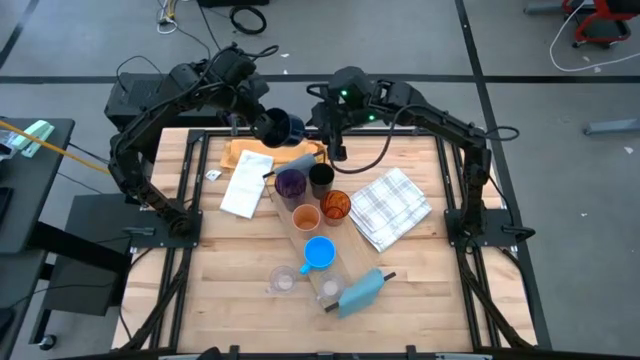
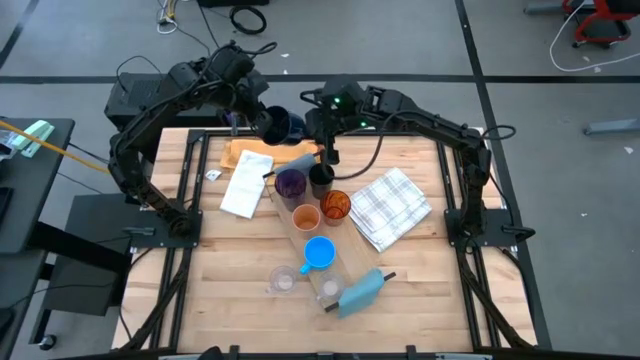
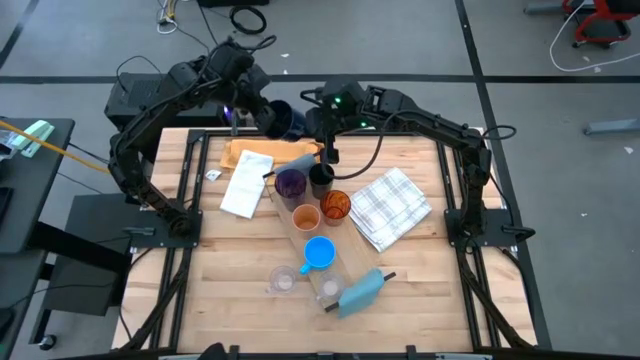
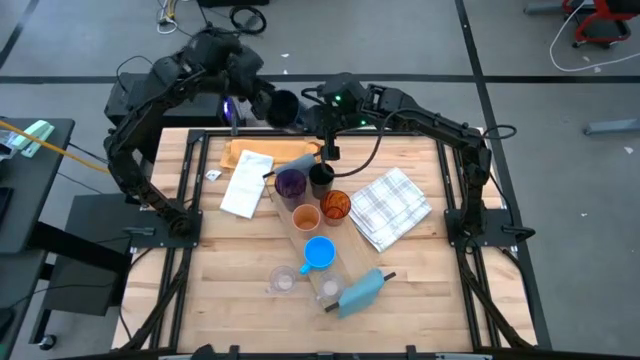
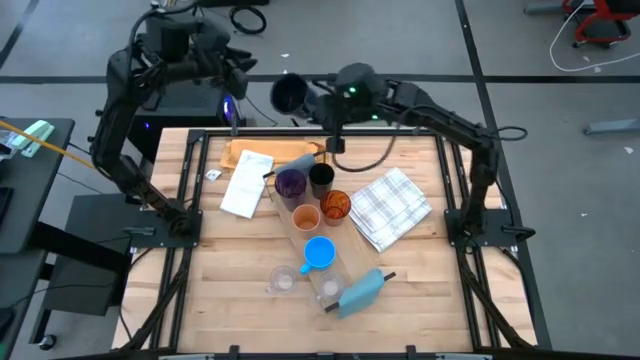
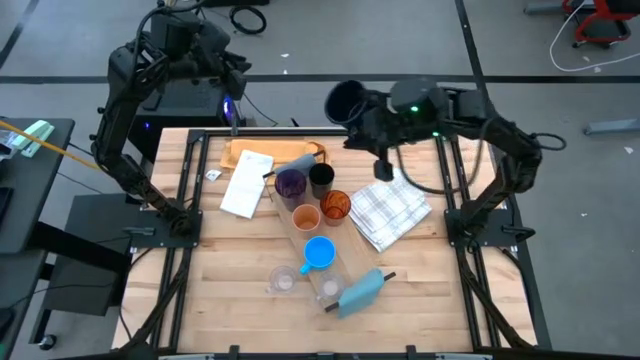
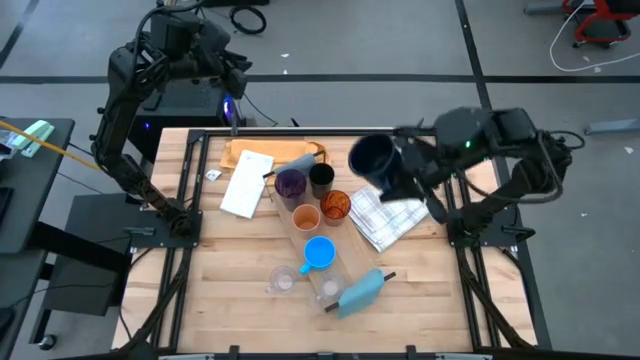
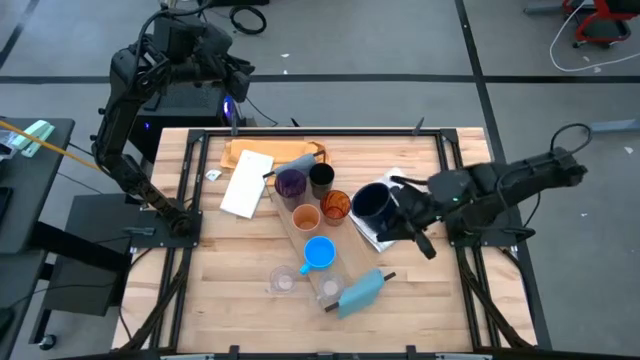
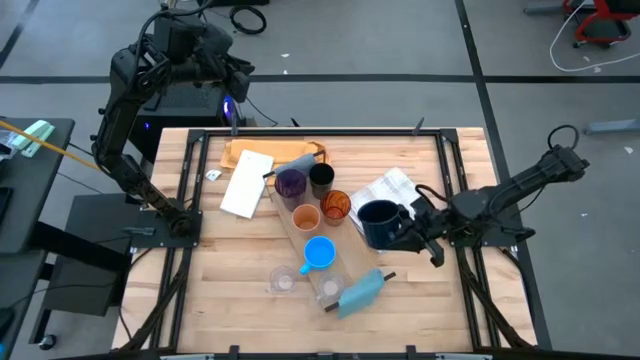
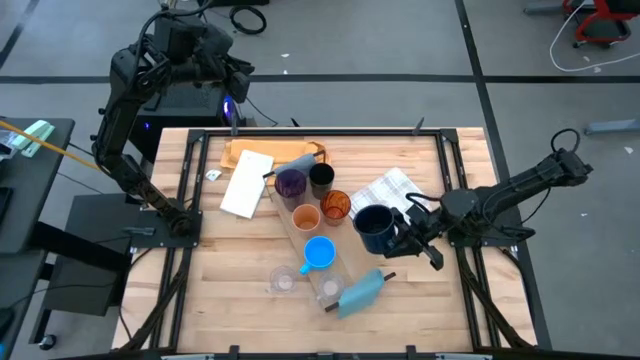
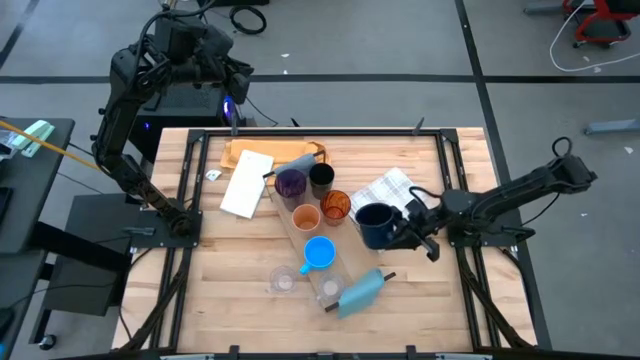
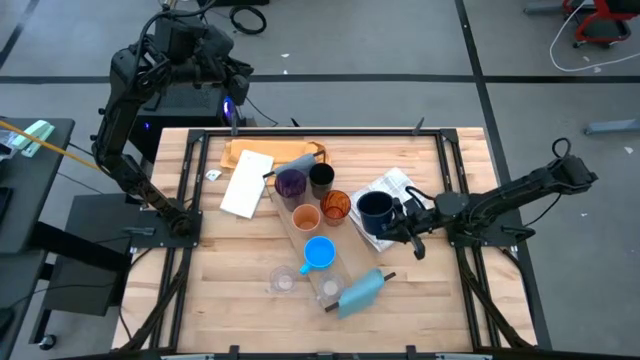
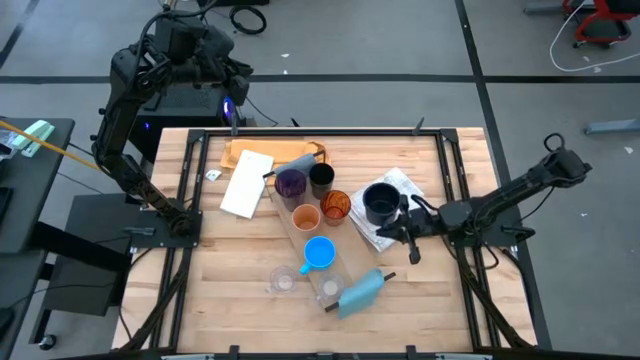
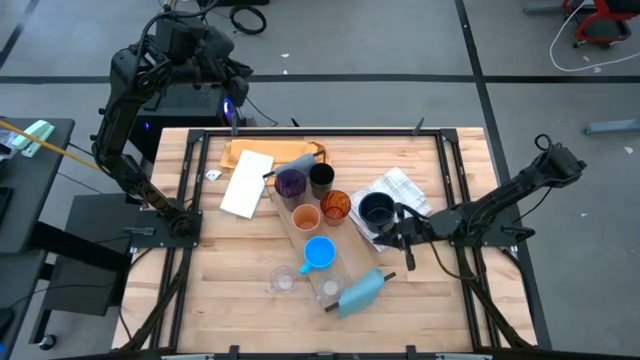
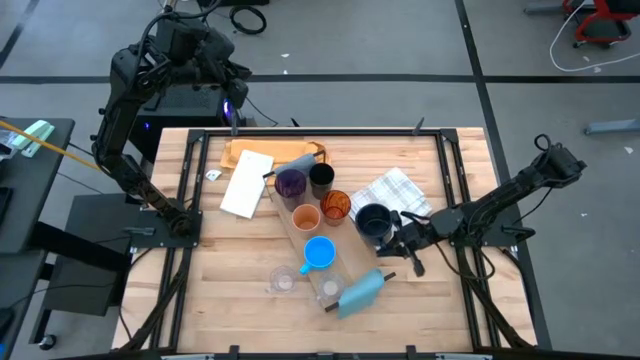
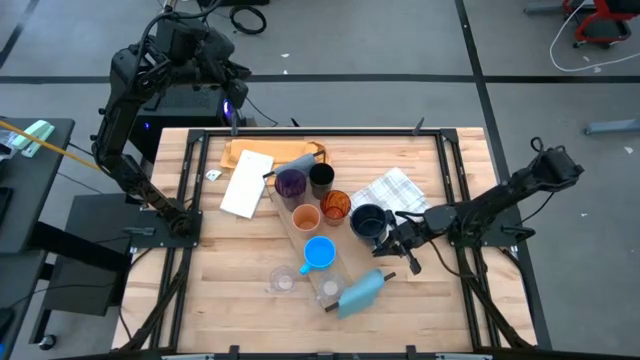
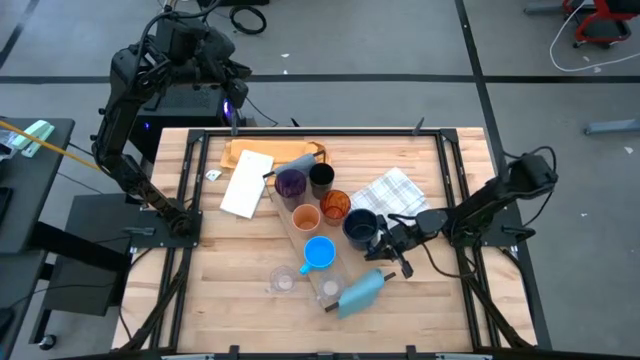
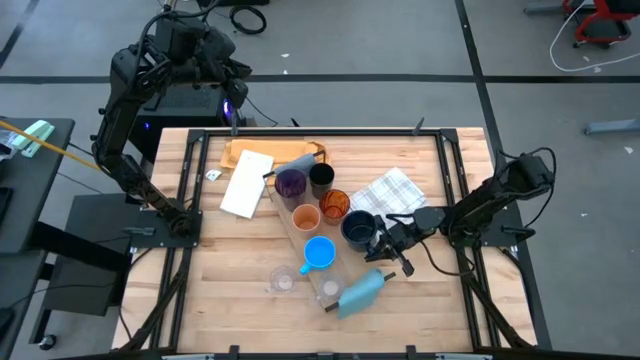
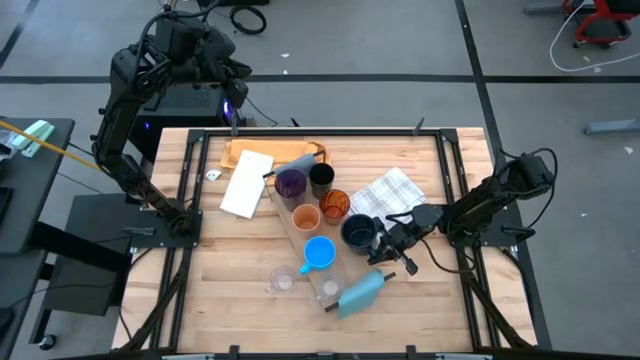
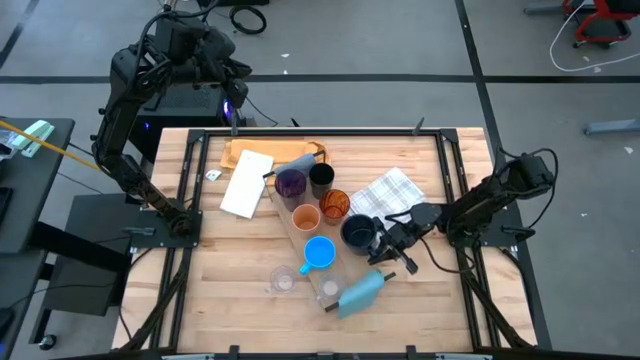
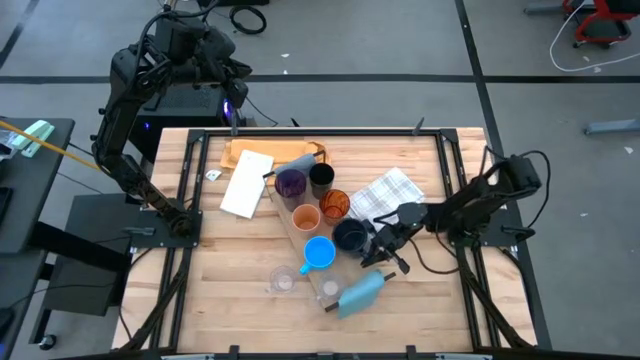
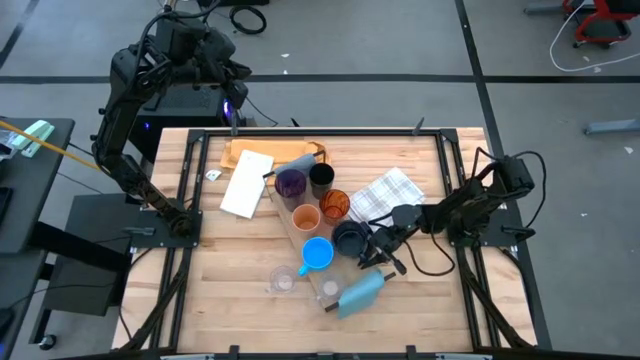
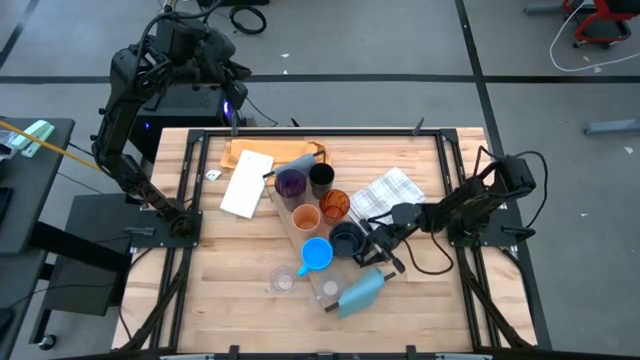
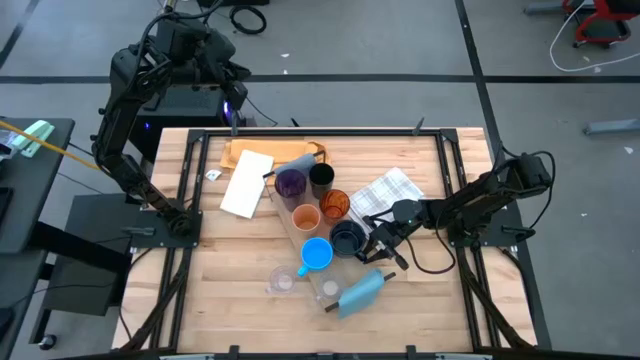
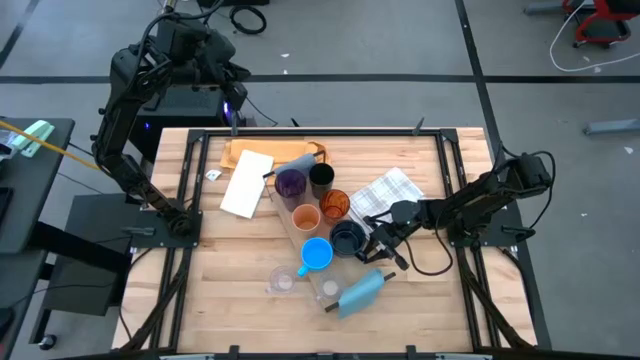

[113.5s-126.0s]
Task: Stack small to large cups/mugs on shelf
Put the dark blue mug on the shelf

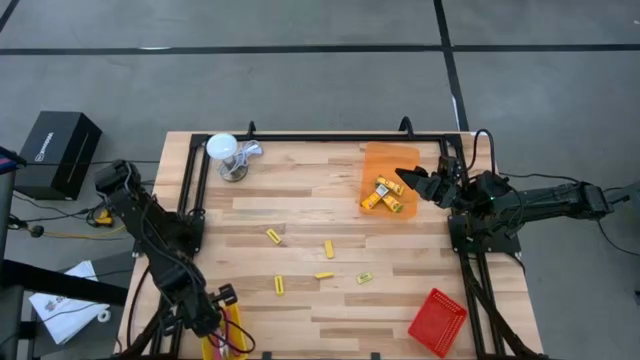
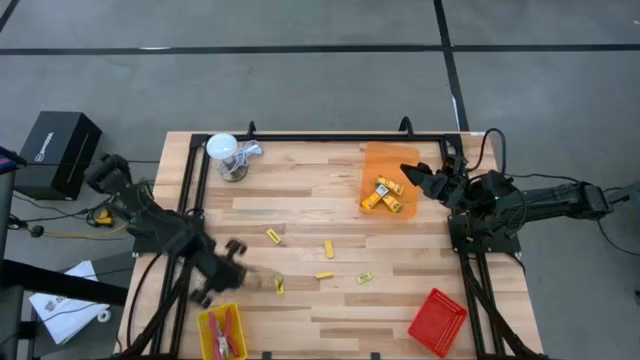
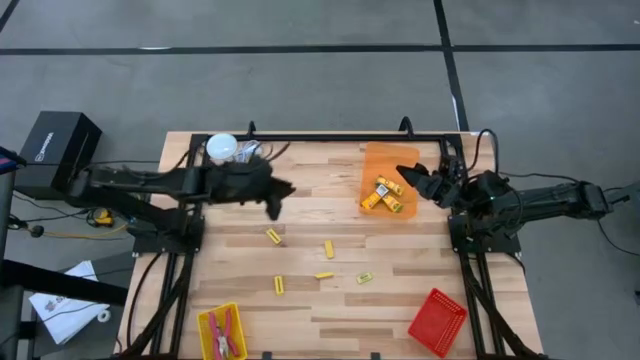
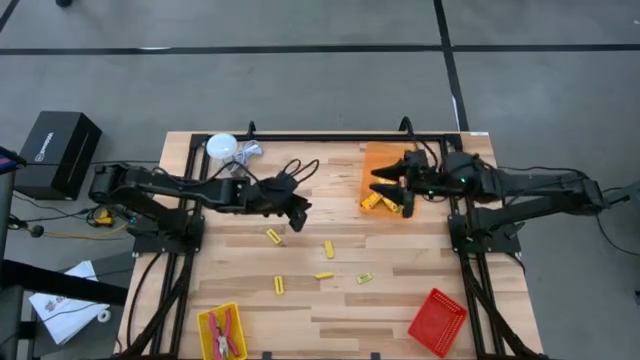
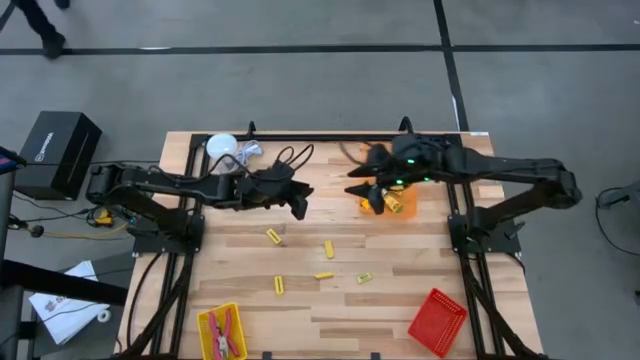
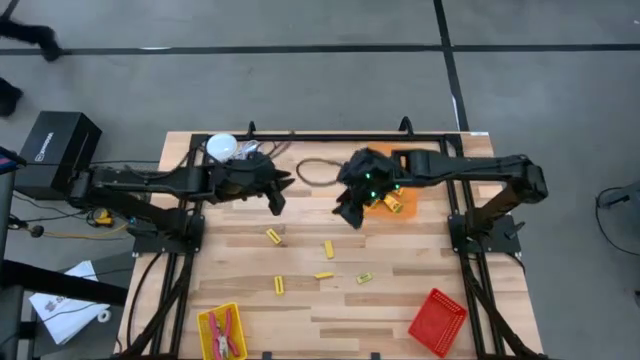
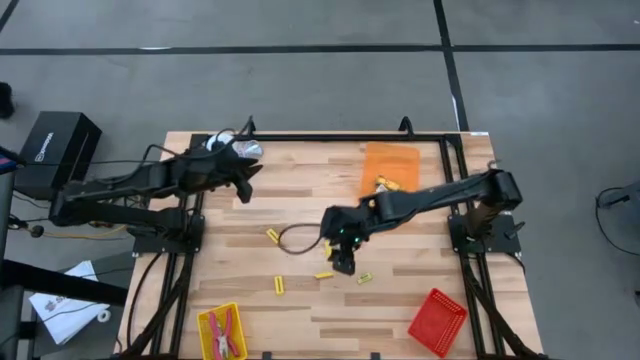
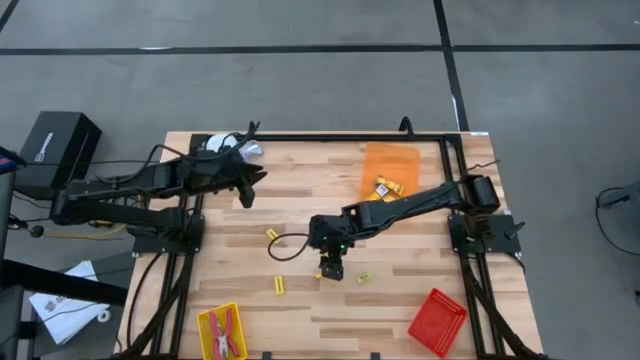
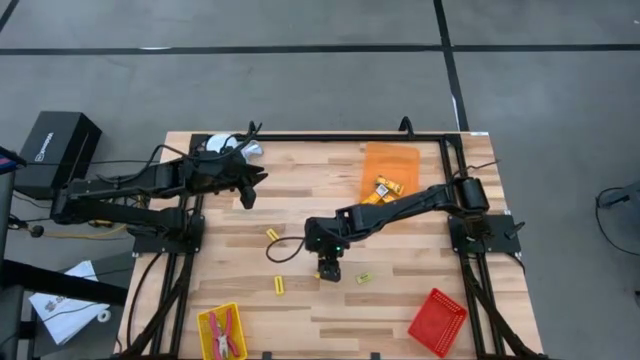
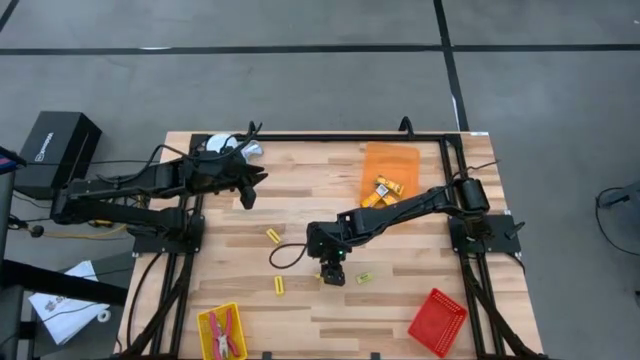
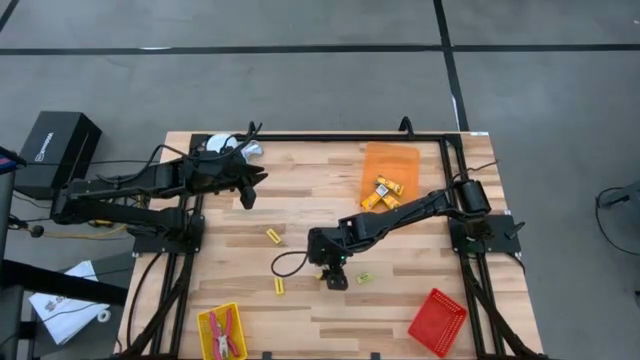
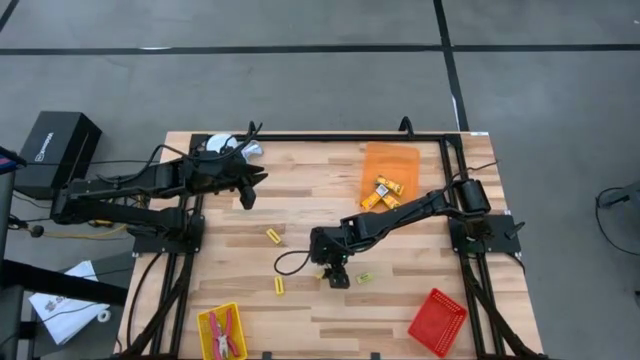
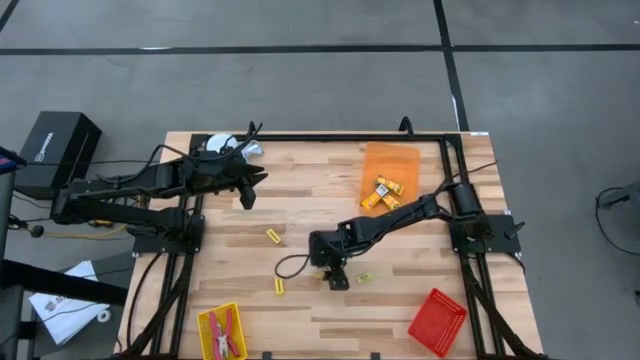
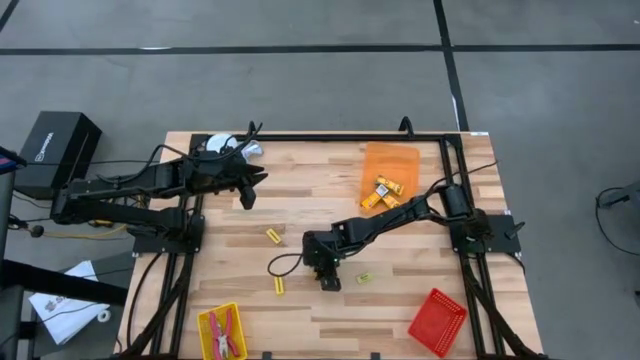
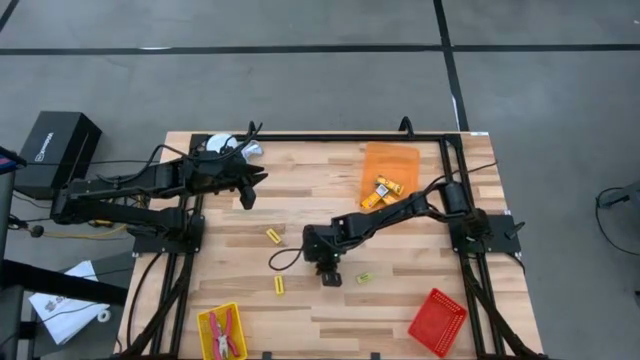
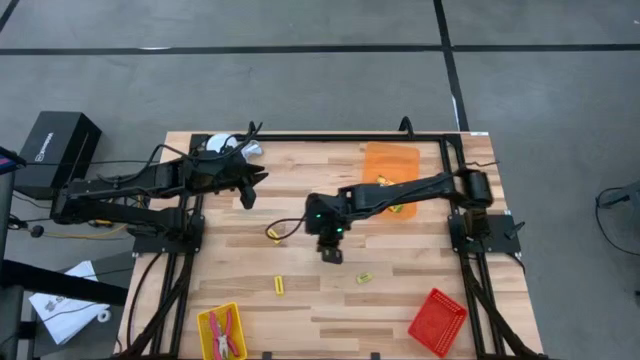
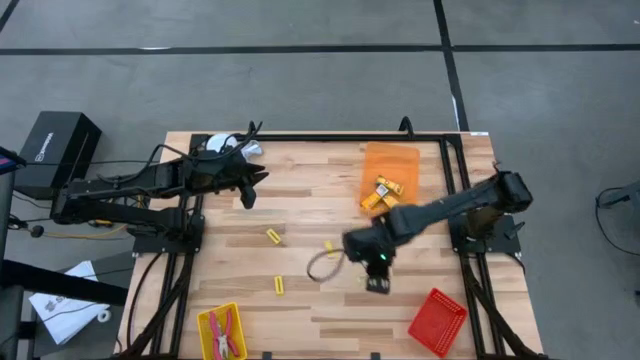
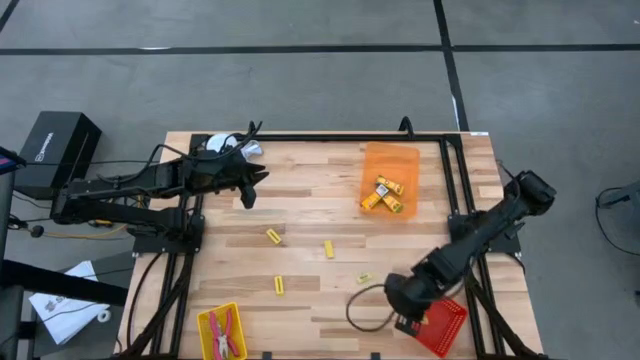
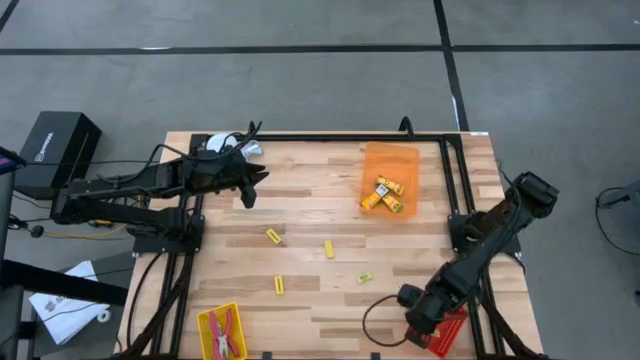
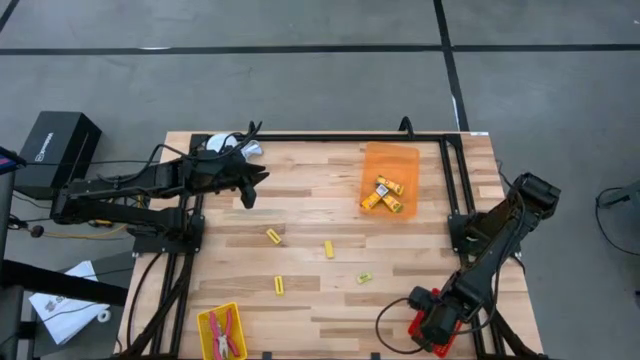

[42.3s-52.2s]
Task: Pick & Place School Supplies
Put the yellow eraser into the red bin
